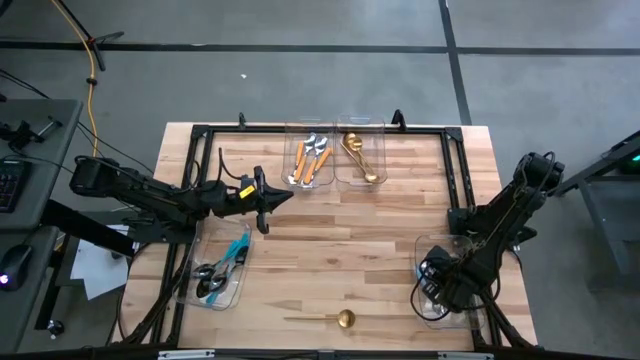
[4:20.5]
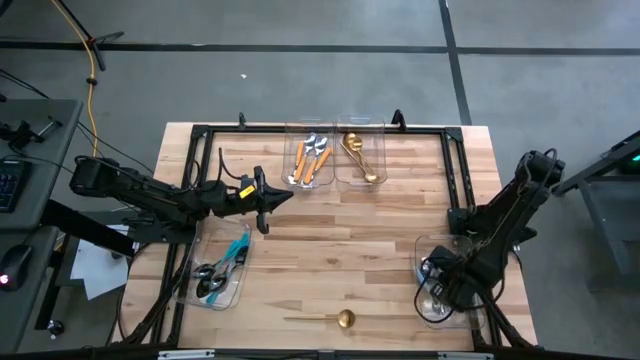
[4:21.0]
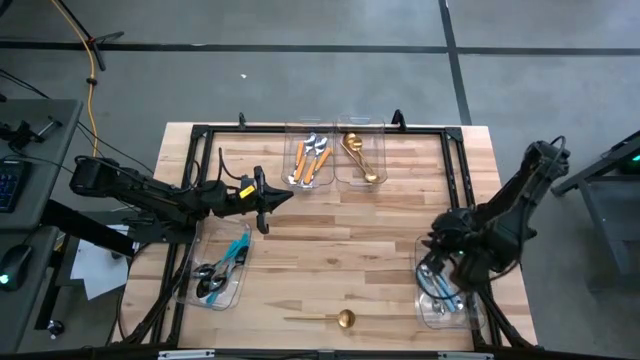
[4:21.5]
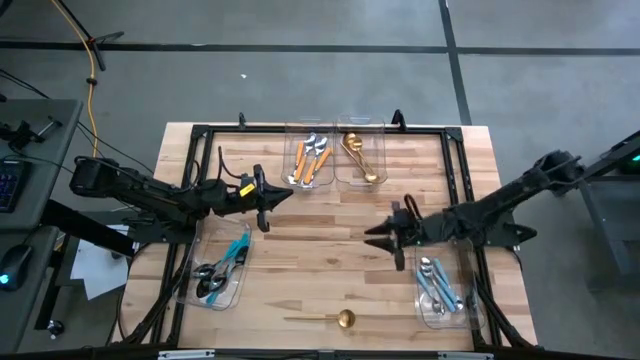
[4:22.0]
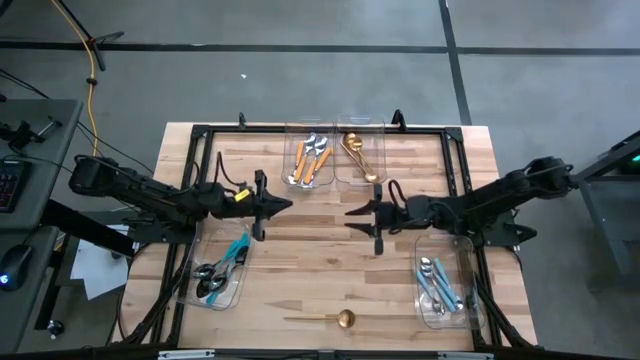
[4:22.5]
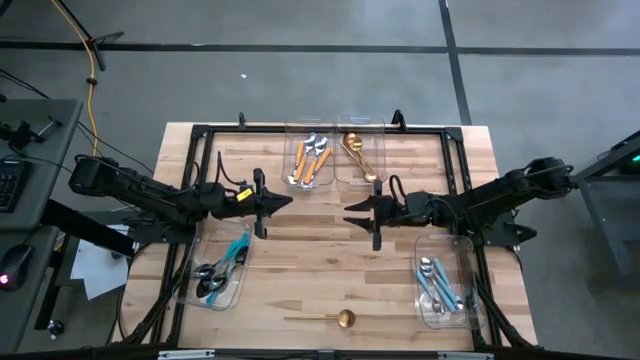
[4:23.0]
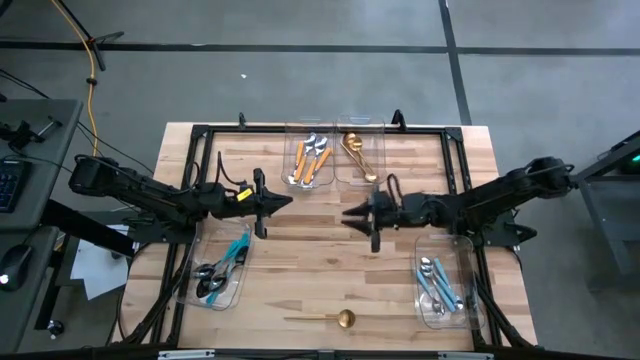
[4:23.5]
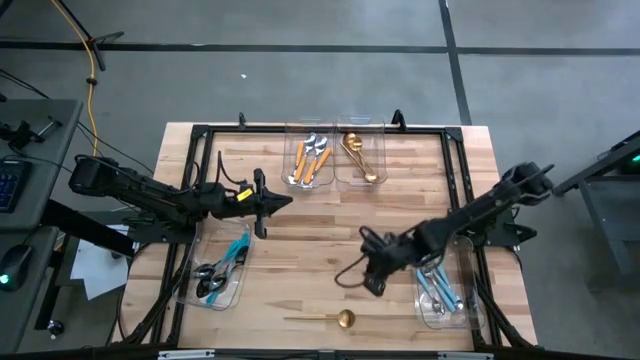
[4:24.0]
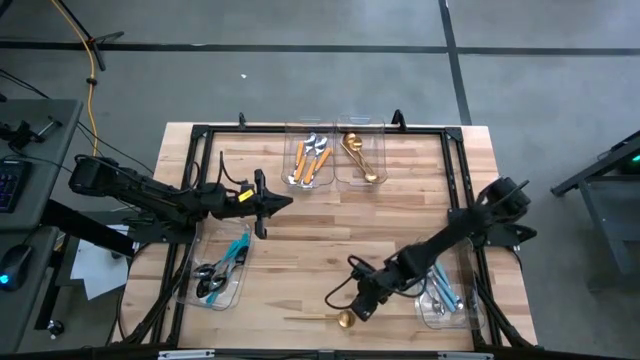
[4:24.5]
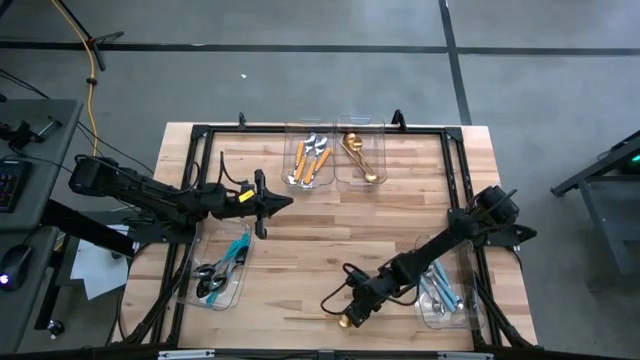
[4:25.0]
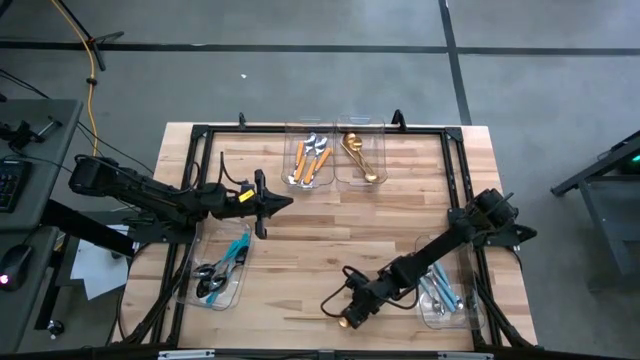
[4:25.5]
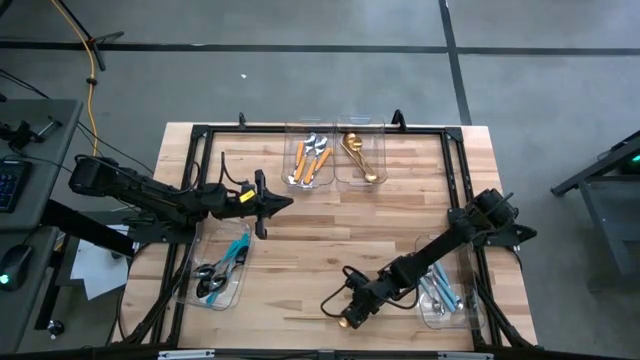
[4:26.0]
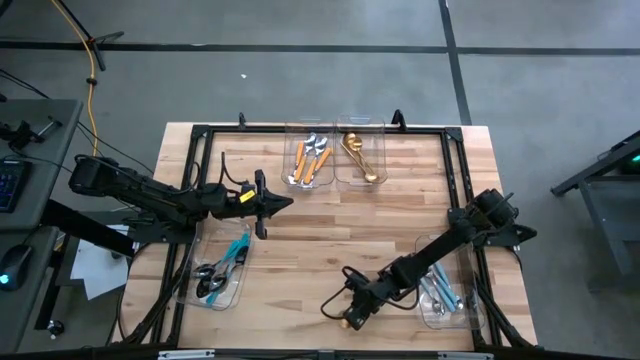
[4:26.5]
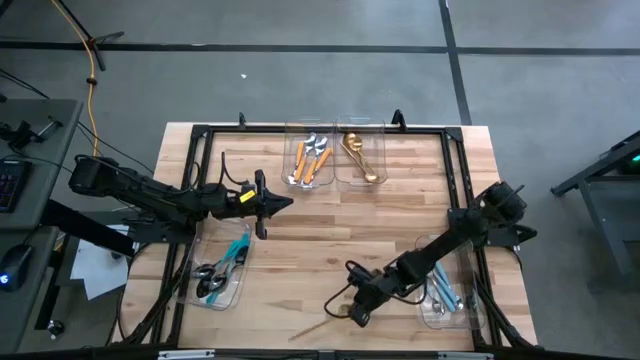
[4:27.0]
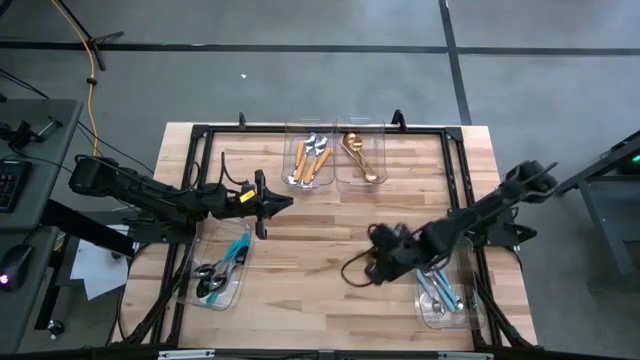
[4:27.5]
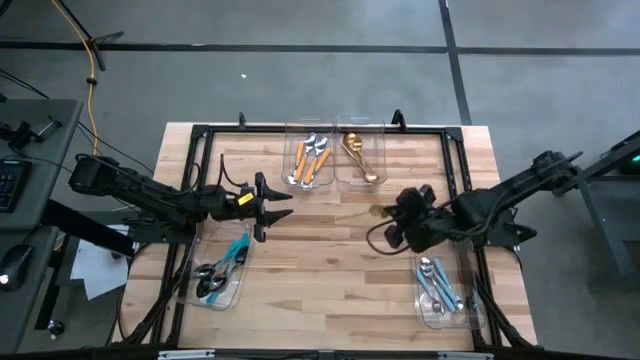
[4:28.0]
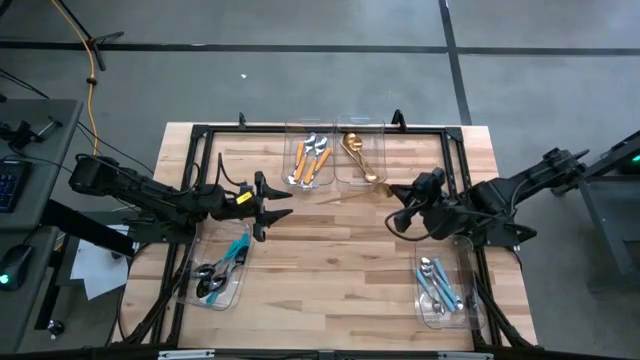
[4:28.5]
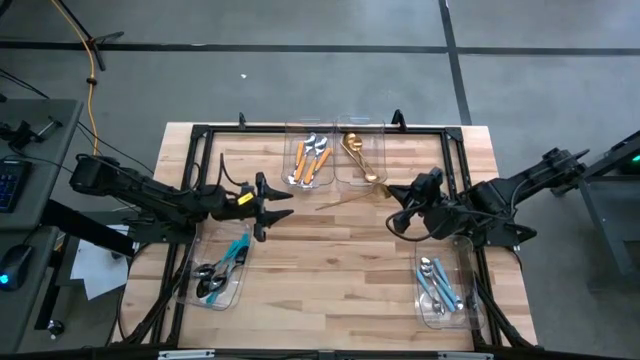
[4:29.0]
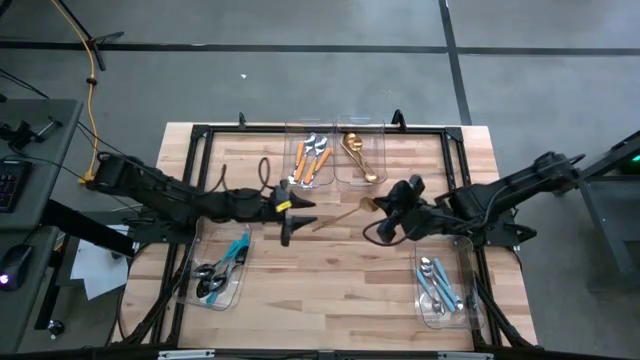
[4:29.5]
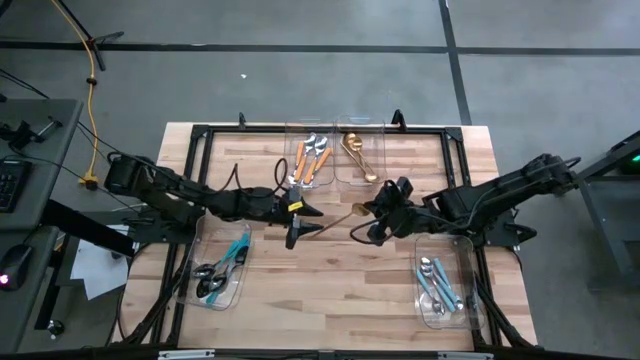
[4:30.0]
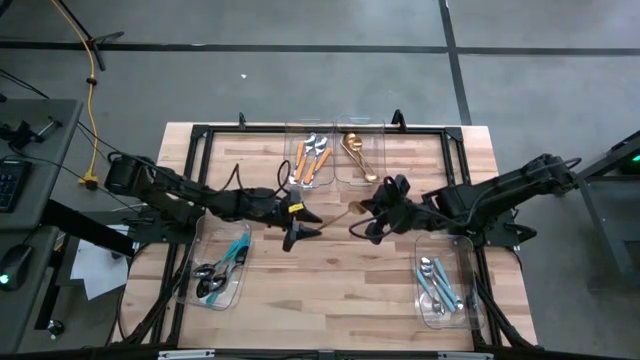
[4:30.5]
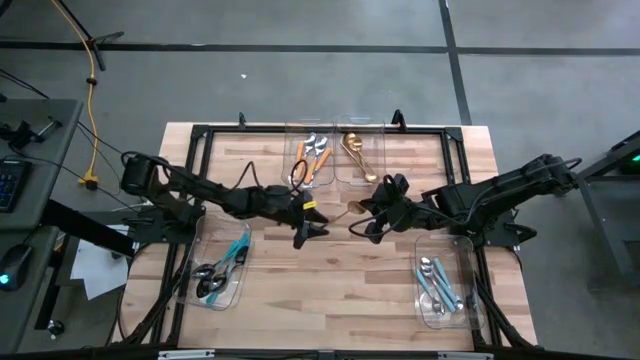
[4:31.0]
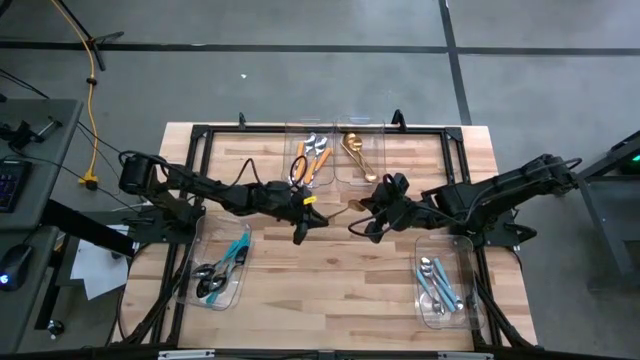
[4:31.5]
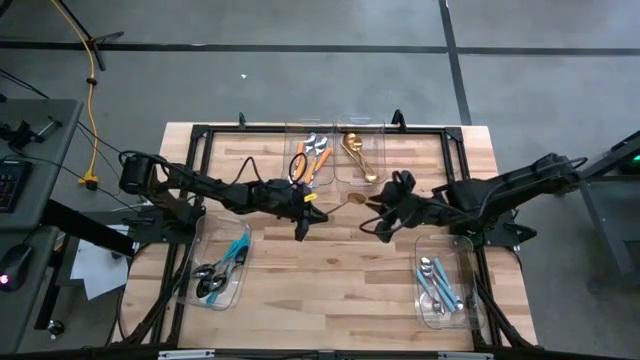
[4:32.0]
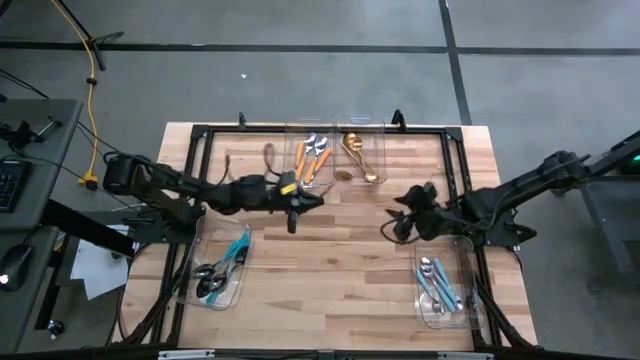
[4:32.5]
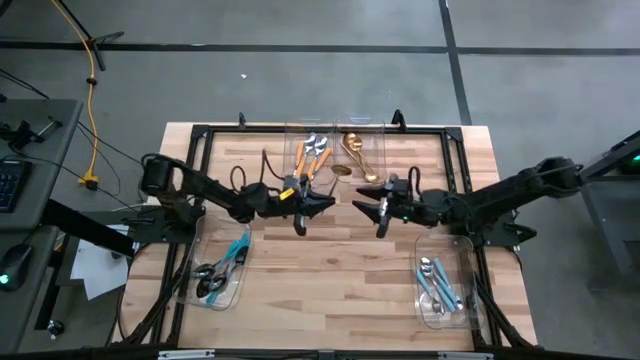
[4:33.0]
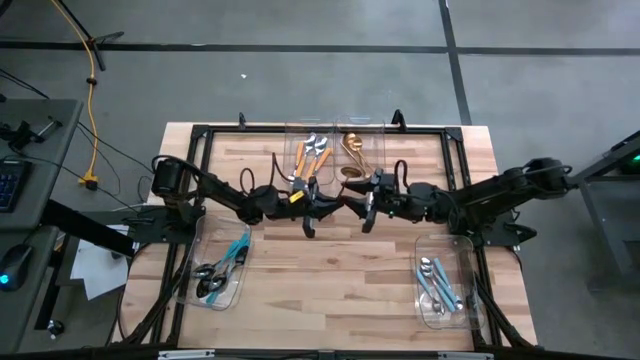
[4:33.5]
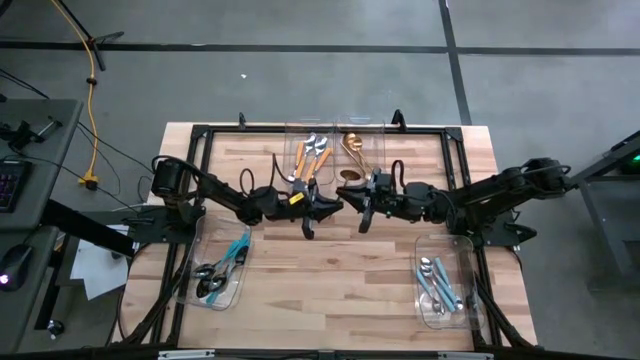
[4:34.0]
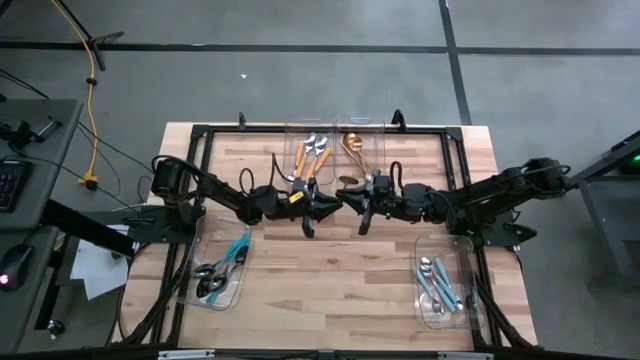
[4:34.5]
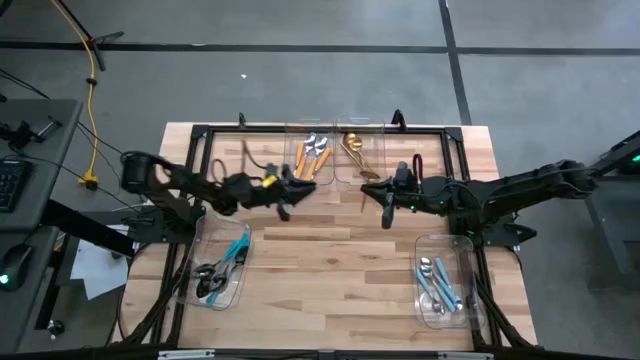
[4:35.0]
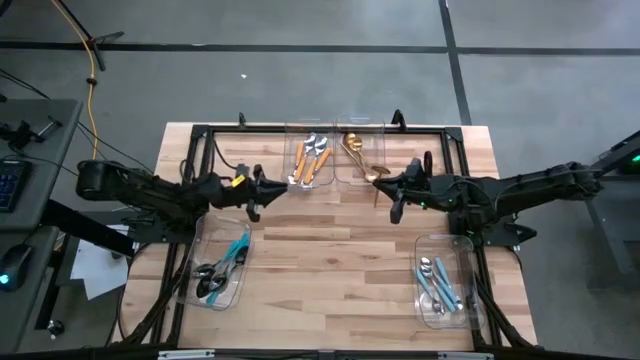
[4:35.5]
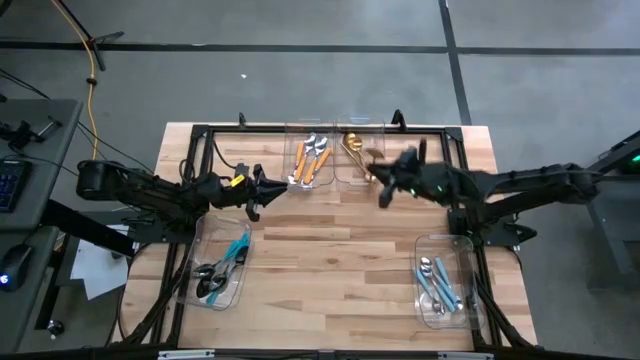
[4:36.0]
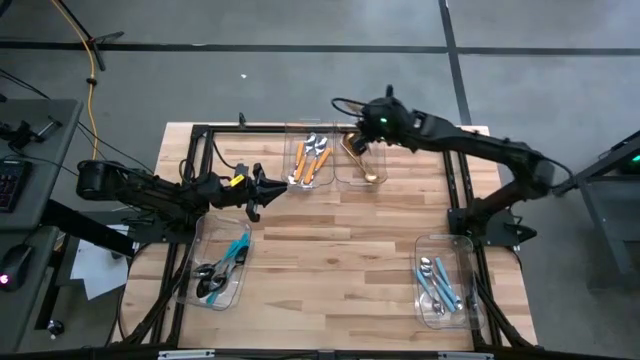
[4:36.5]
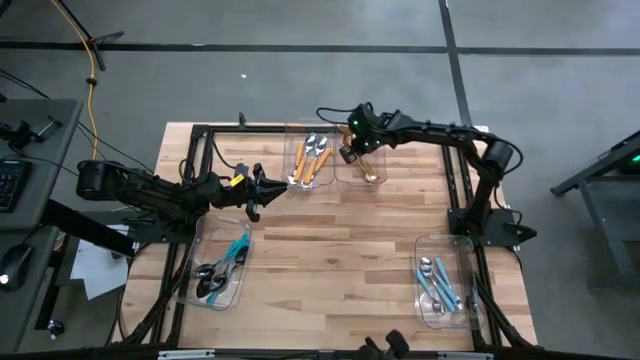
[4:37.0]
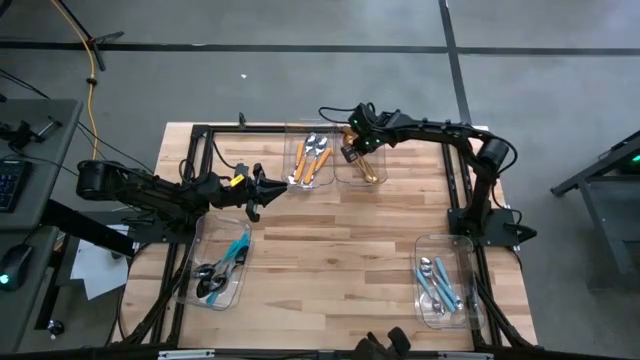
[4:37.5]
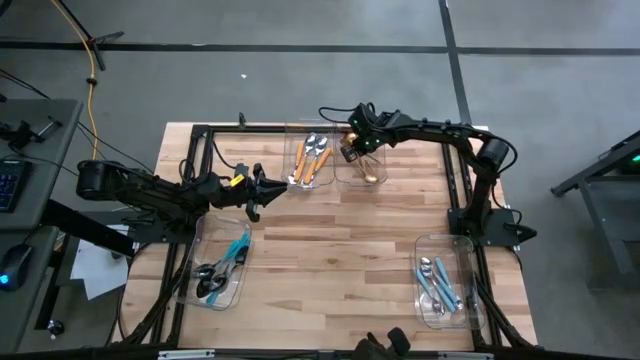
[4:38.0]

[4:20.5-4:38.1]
Task: Sort silverware by color (type)
Put the gold spoon into the top right transparent bin
